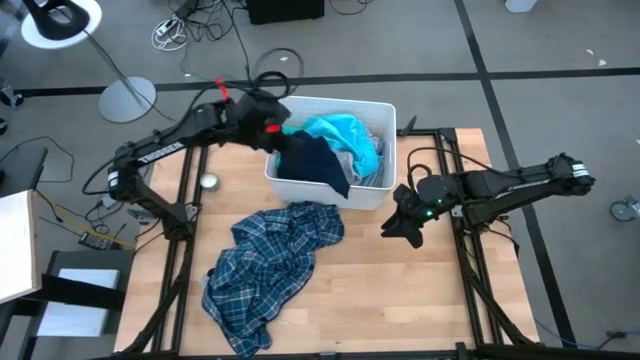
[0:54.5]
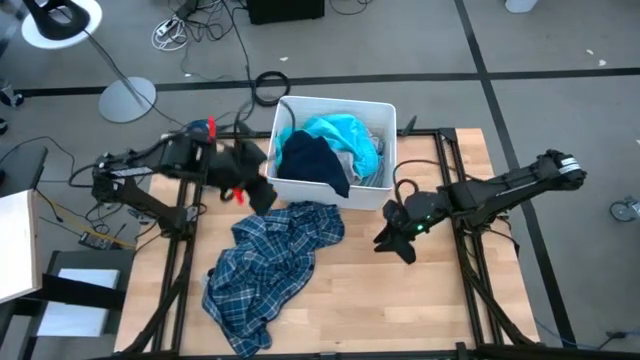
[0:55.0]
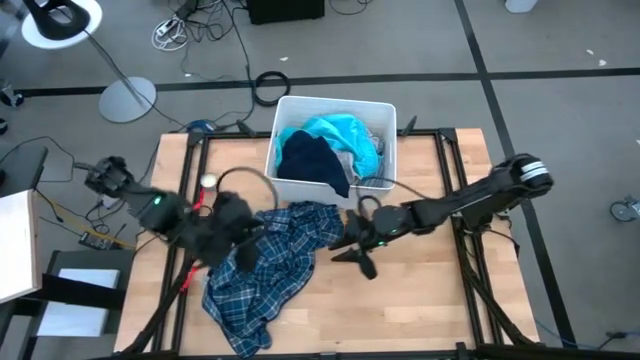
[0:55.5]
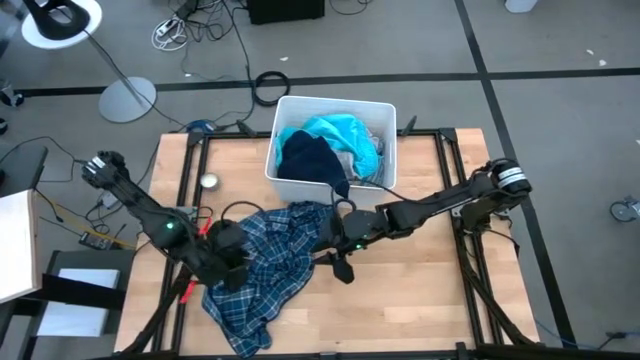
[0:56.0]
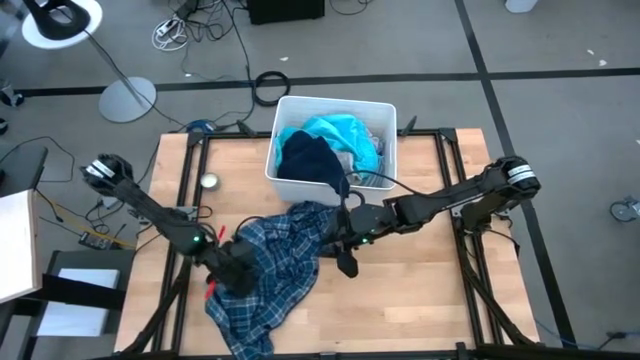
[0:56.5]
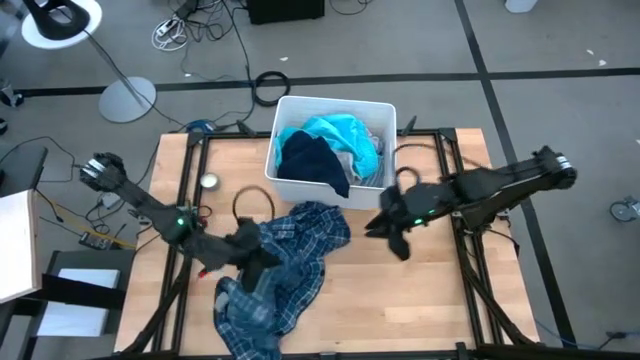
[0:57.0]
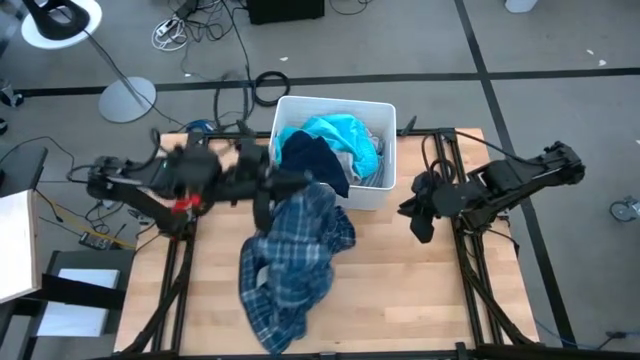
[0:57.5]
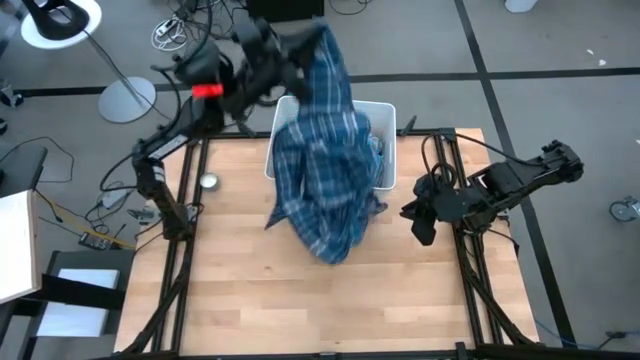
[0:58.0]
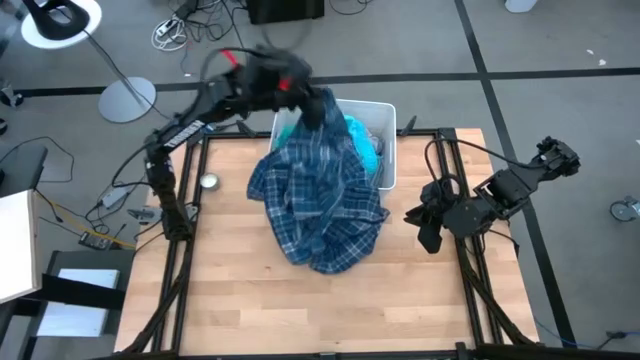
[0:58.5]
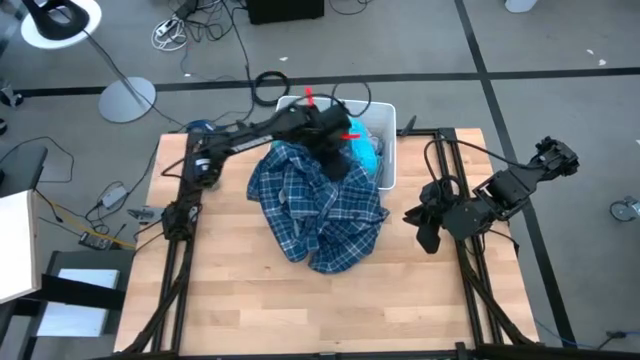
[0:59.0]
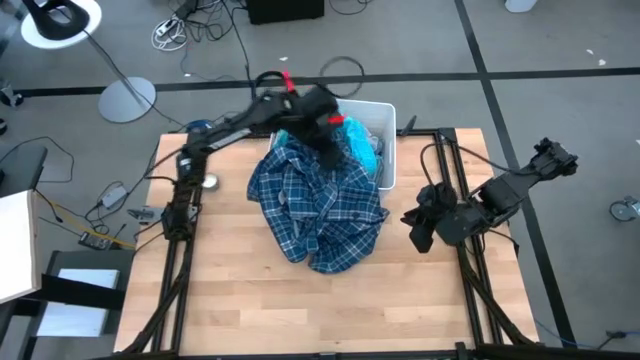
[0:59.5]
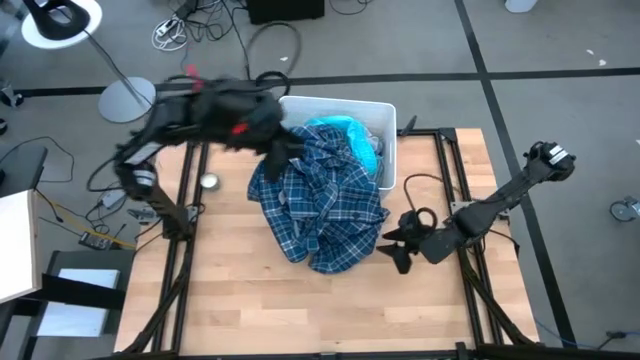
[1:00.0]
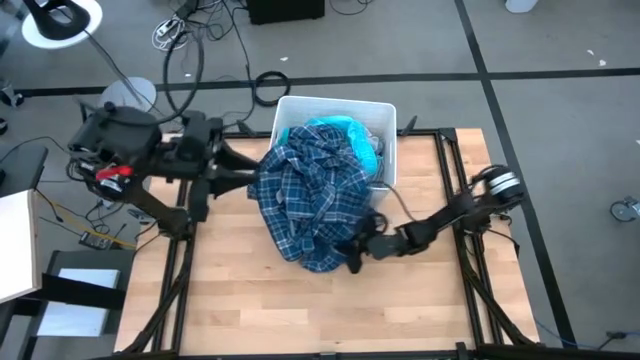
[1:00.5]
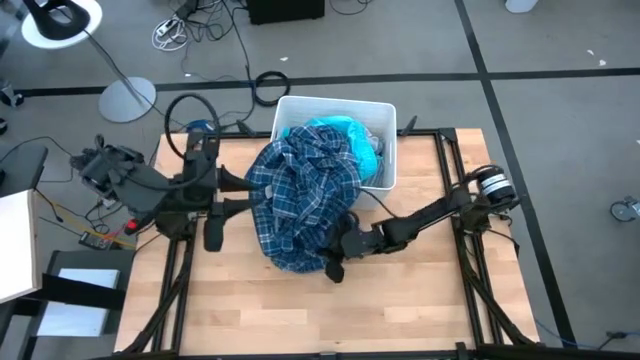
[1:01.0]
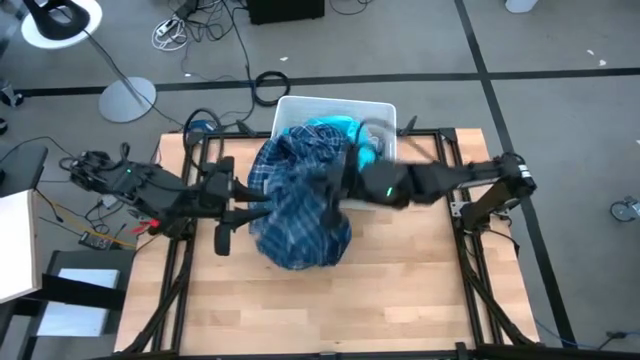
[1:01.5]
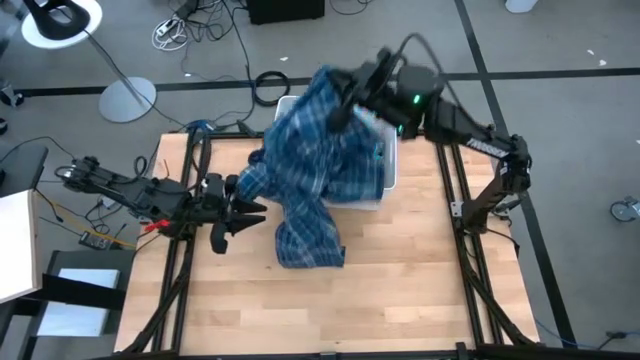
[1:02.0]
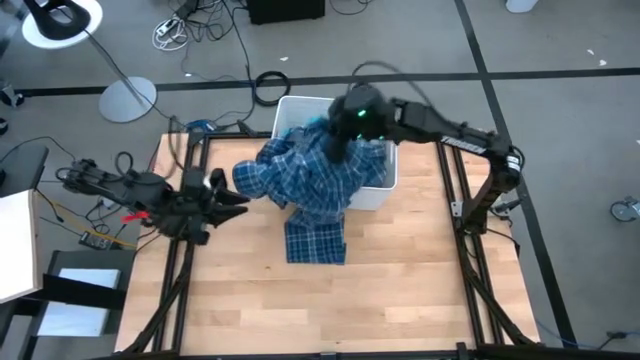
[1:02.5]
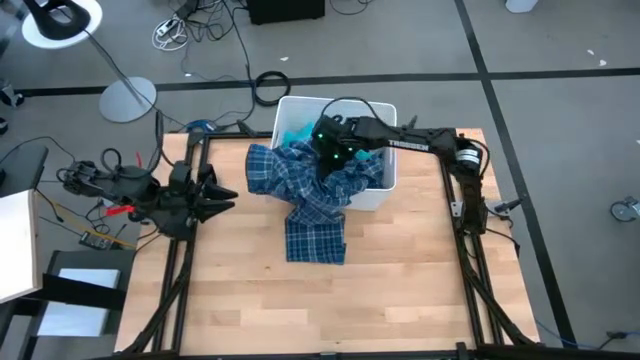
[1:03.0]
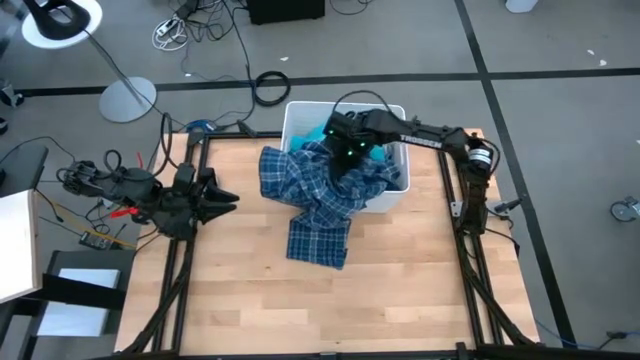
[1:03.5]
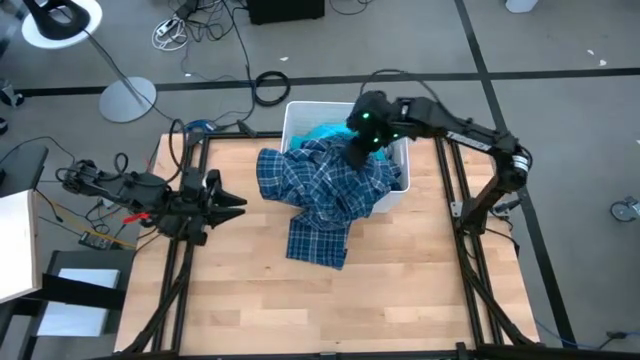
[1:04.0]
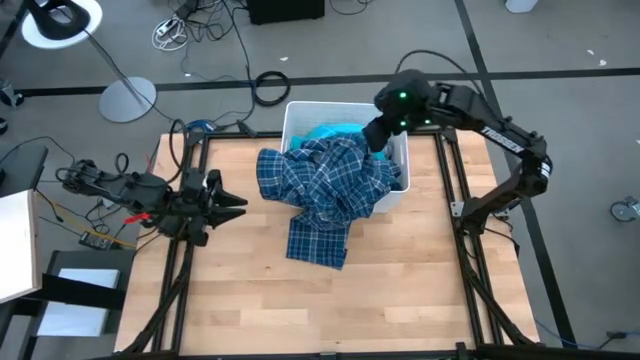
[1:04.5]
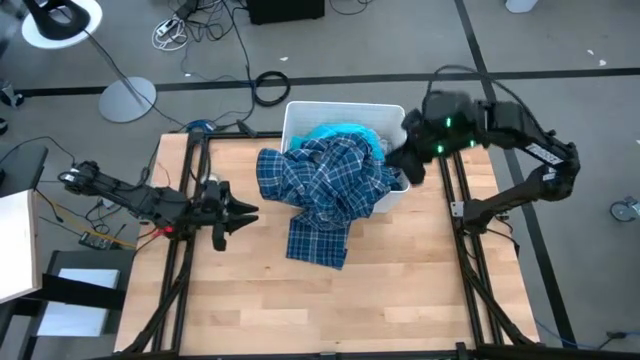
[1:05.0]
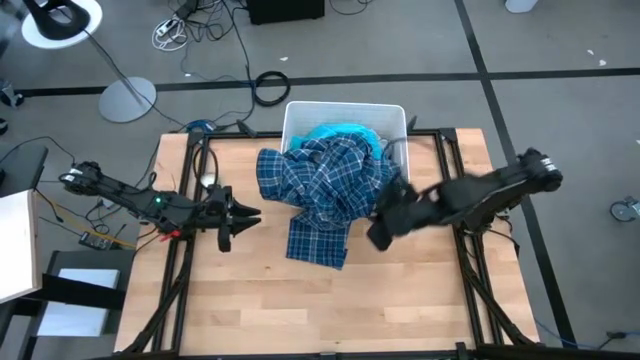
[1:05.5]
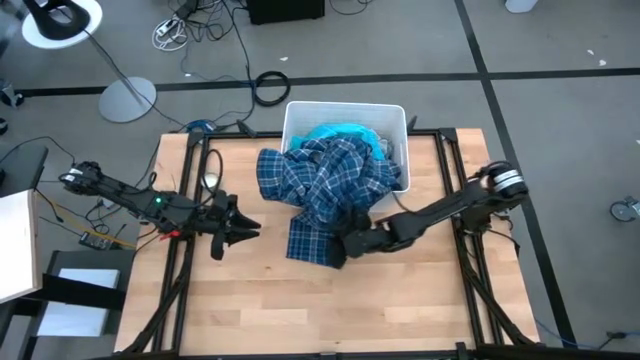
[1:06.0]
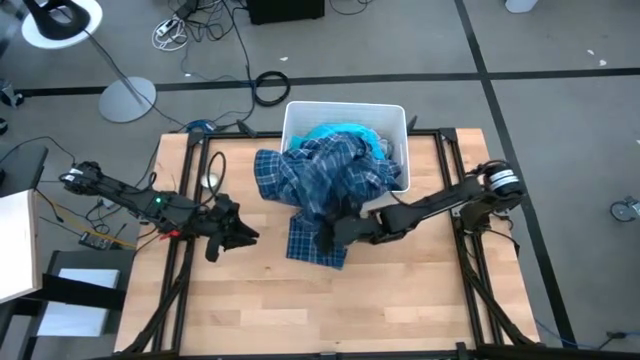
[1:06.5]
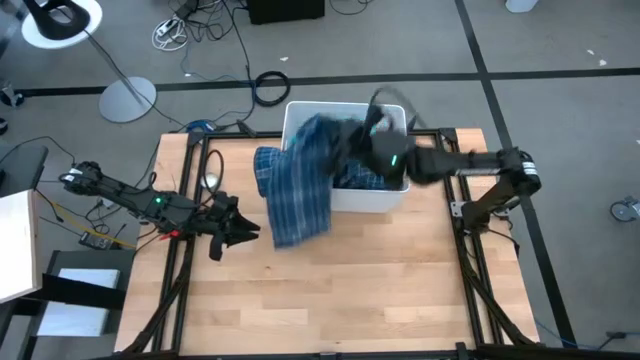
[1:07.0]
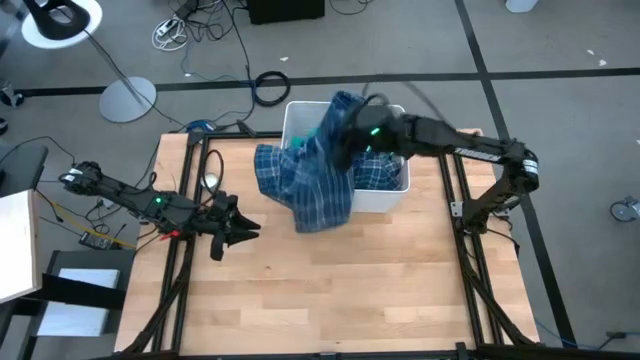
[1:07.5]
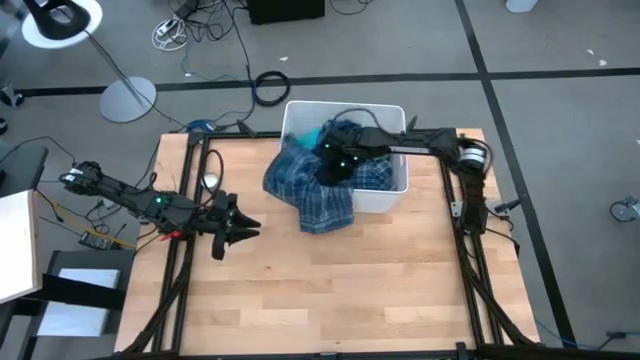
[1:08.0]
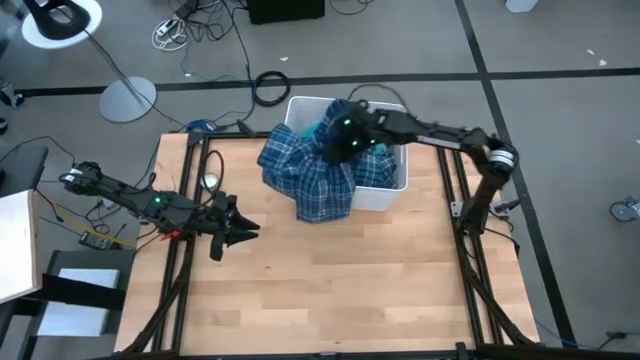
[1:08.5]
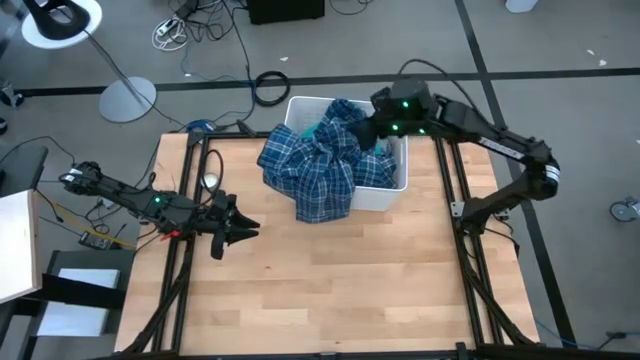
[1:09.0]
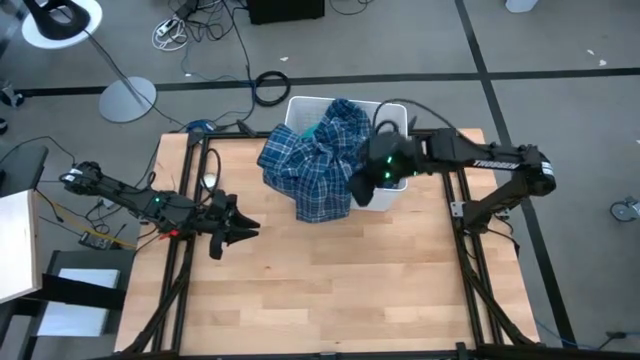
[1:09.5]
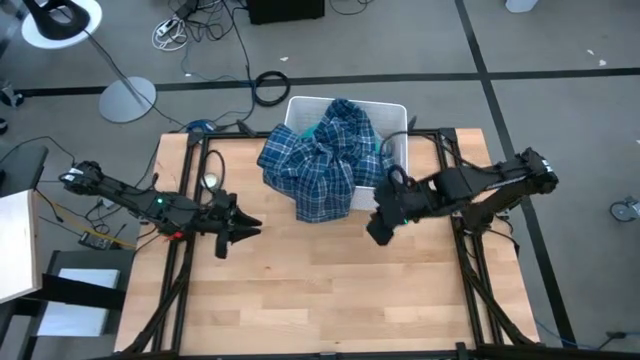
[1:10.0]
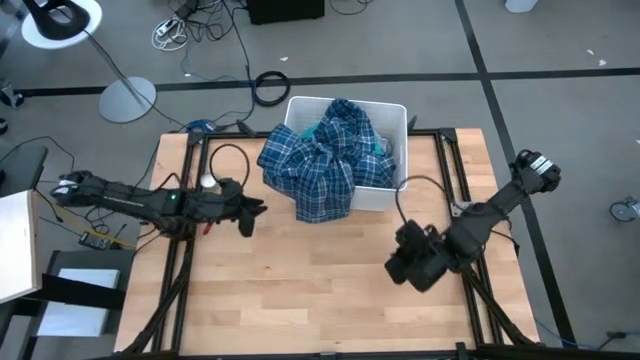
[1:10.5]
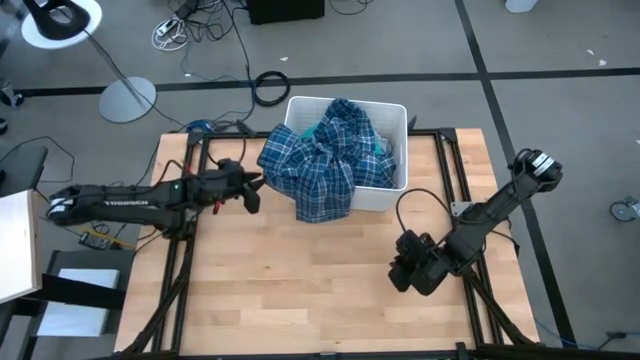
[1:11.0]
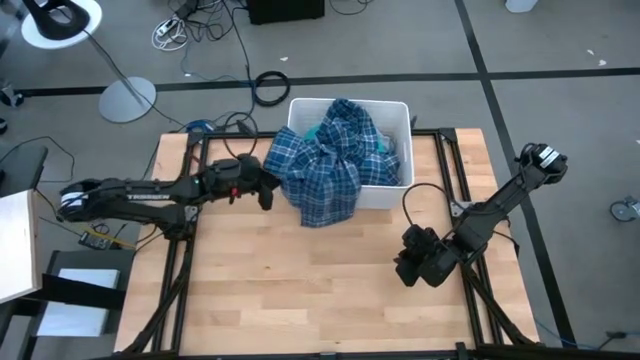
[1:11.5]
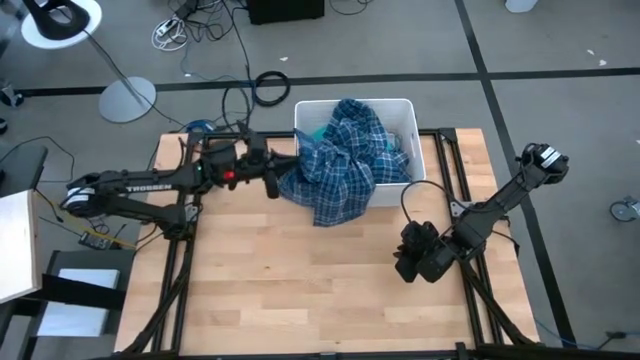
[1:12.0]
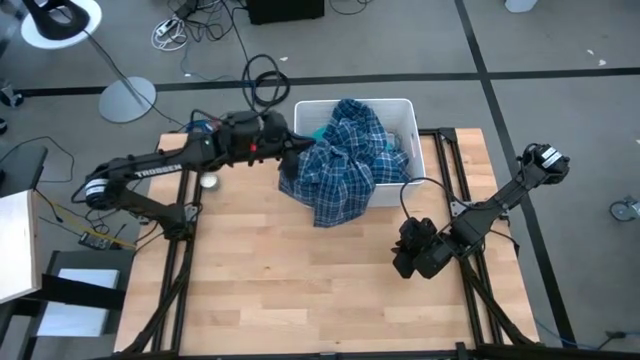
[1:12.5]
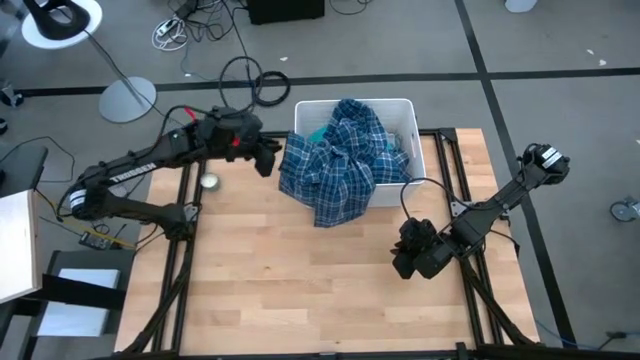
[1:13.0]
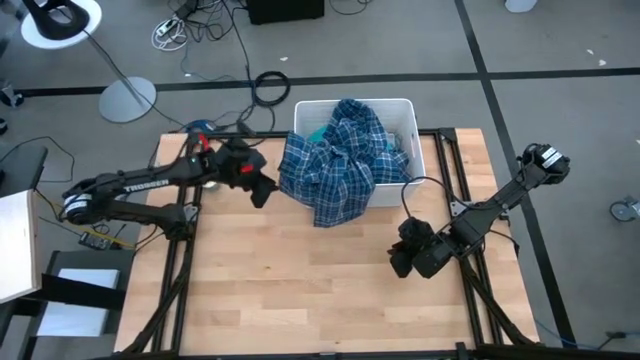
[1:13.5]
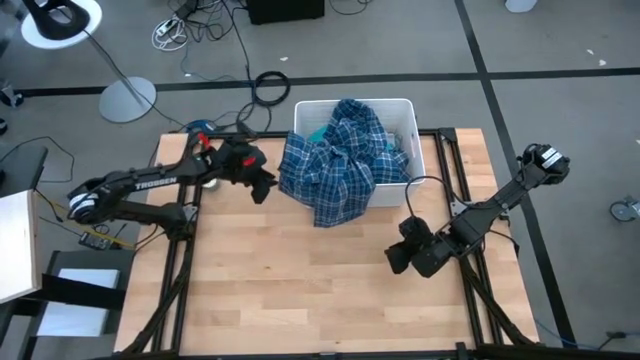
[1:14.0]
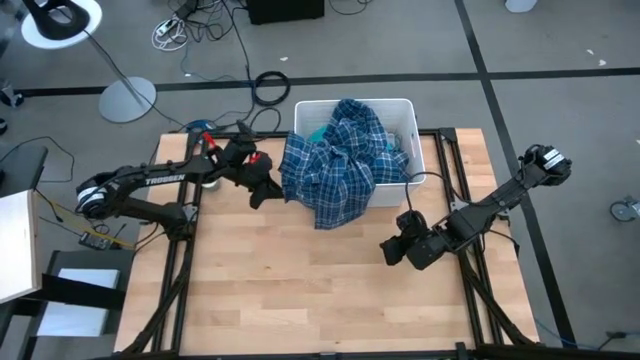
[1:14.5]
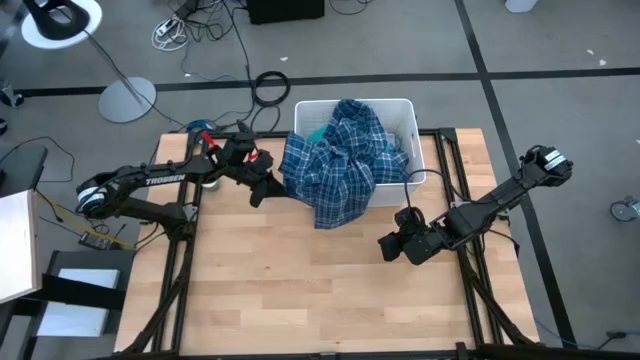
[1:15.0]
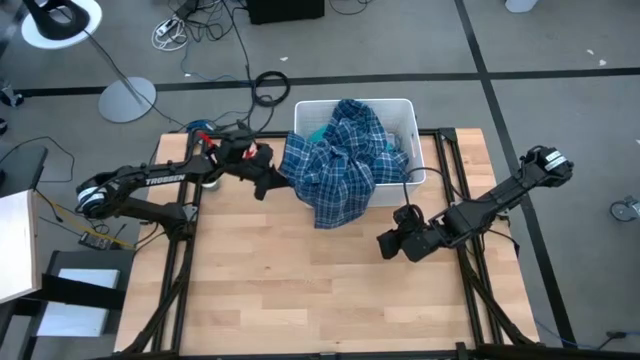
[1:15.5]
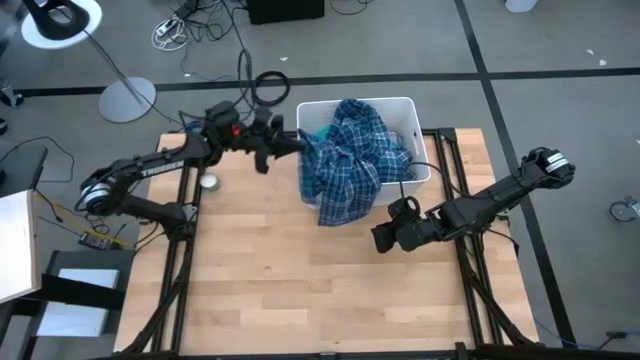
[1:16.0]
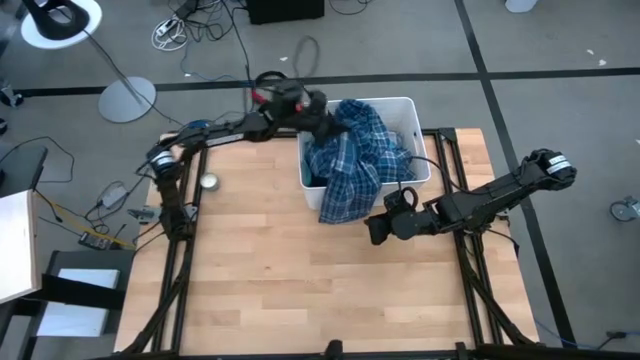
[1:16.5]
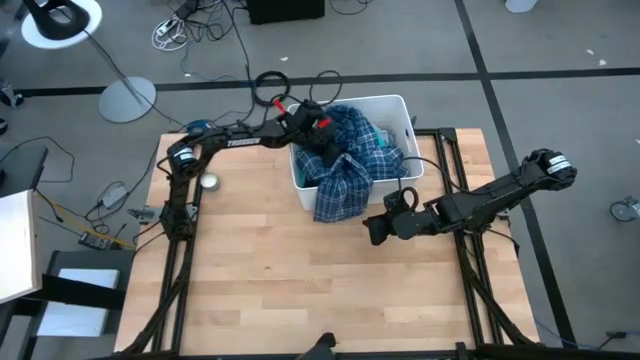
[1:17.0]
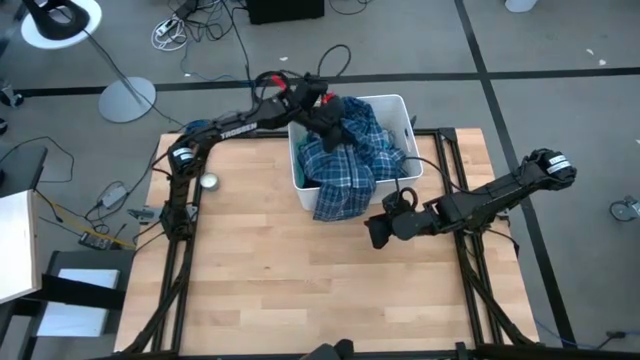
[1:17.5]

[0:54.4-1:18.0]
Task: Sort clothes
Put the dark blue long sleeve into the white bin
